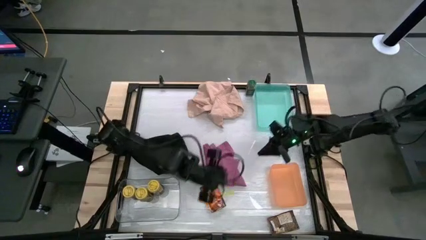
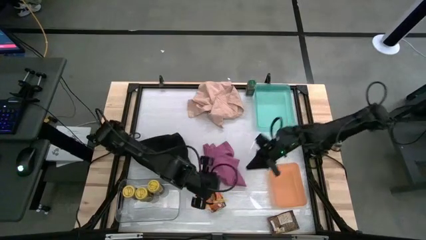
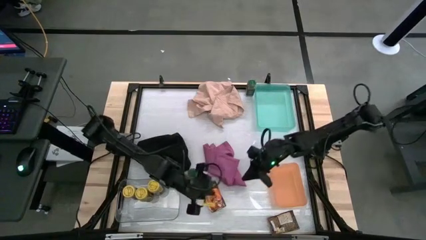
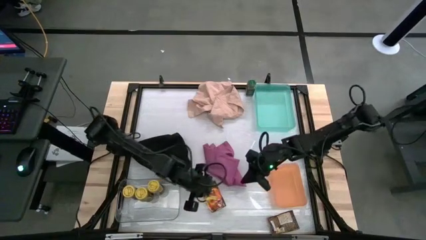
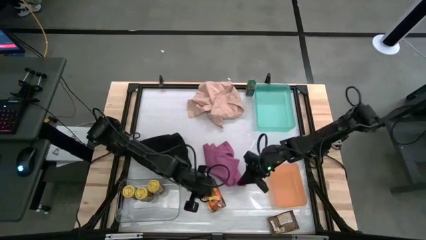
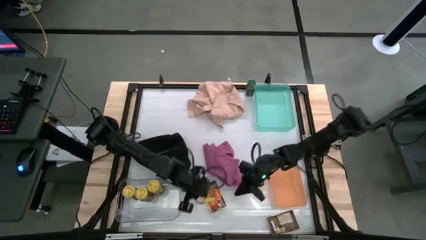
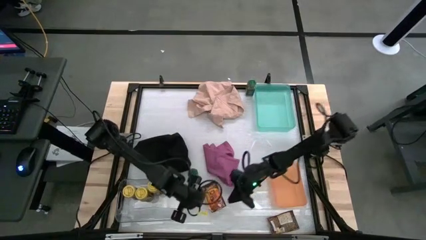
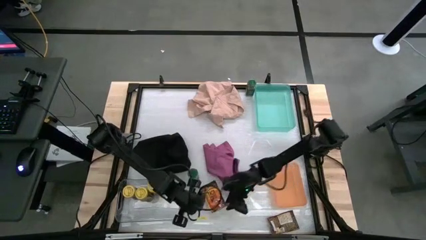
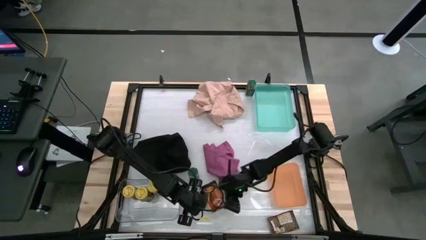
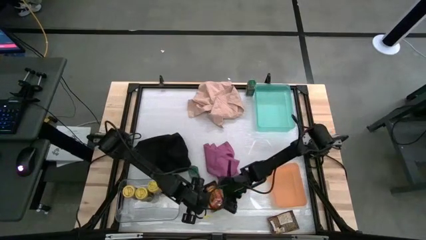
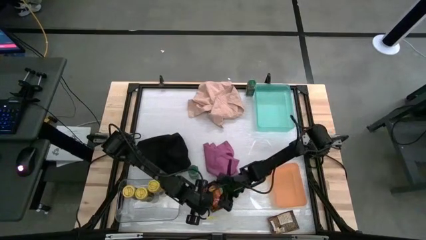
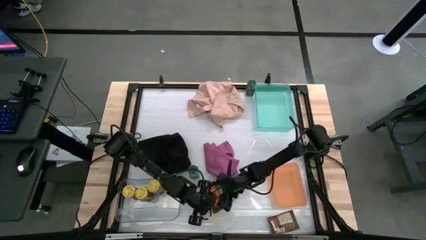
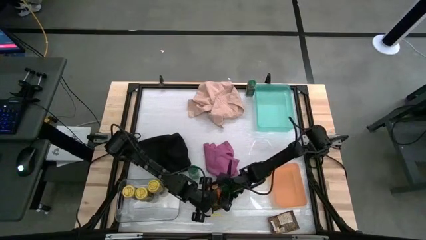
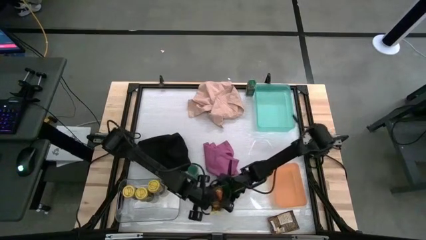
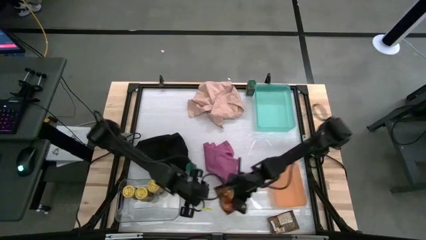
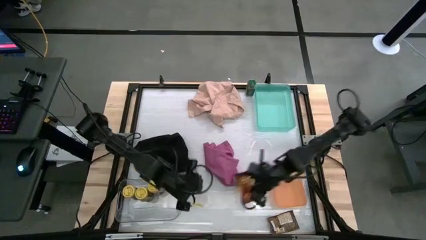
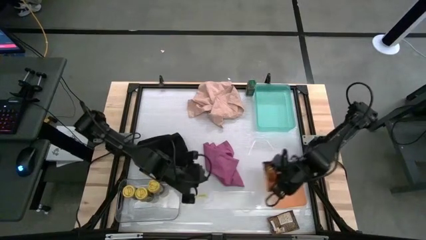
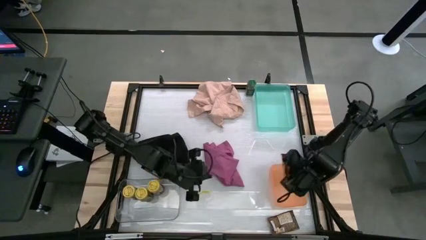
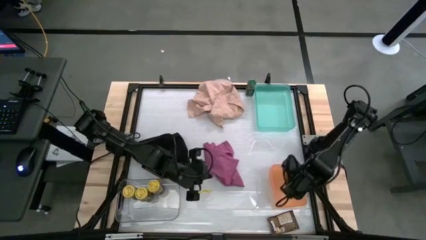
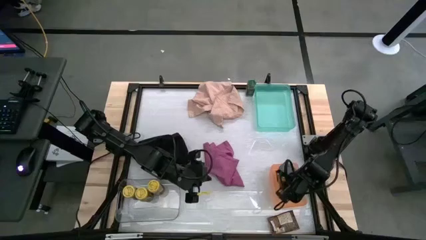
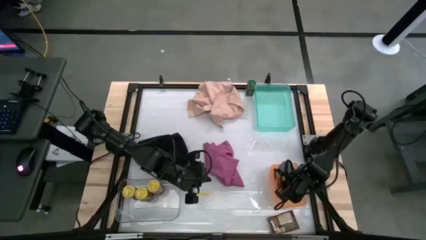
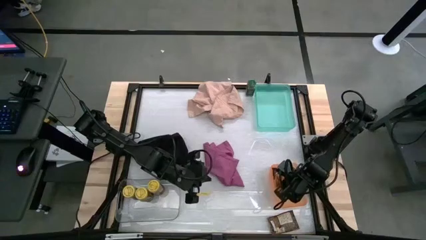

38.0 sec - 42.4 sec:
Task: Sort spices by type
Put the left orange seasoning bag into the orange bin

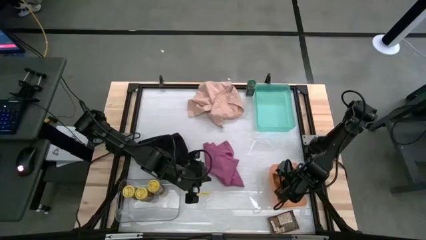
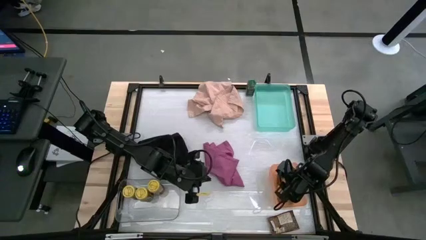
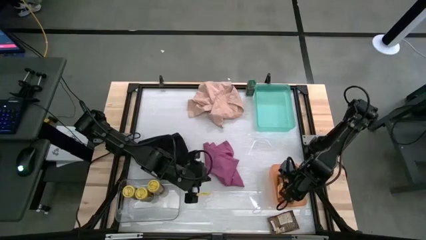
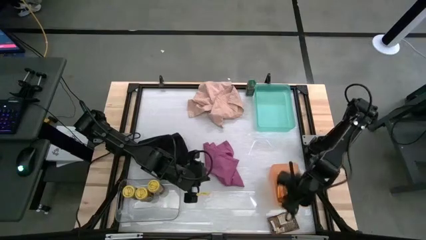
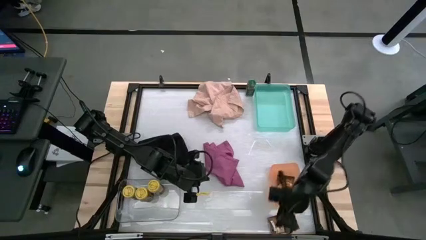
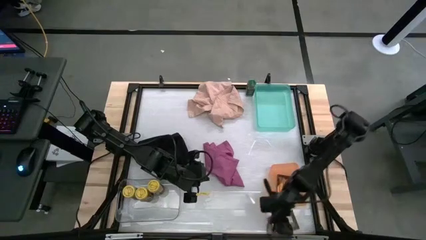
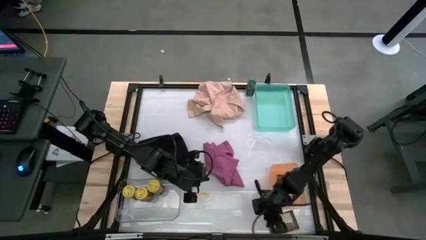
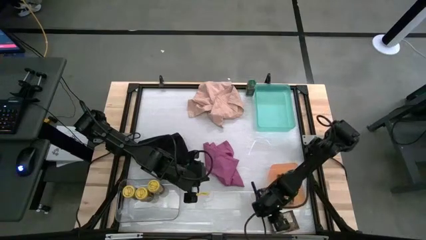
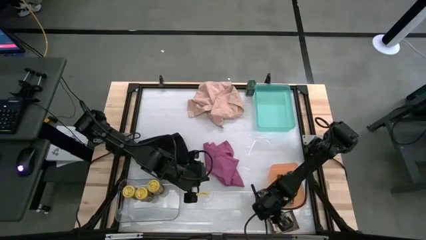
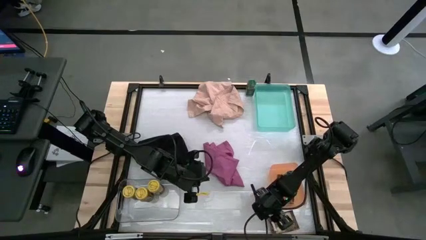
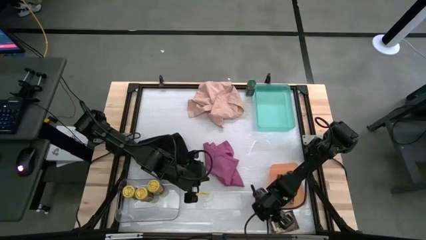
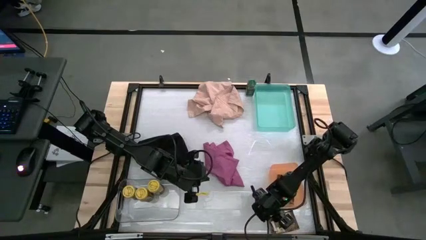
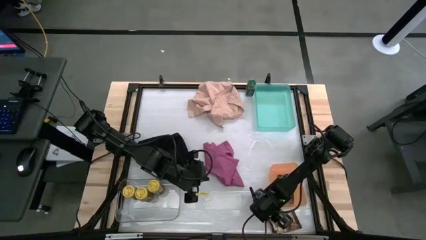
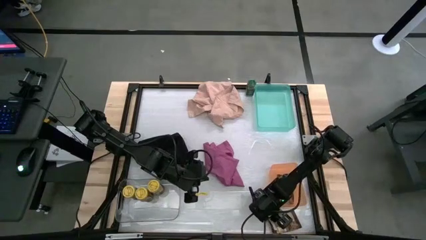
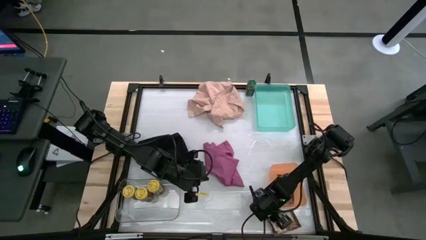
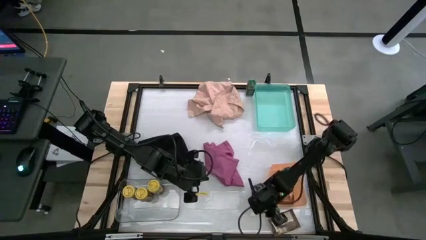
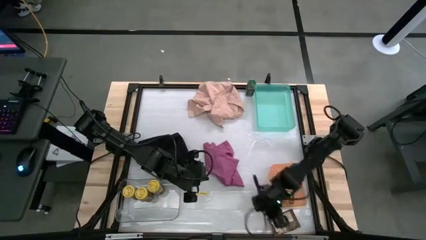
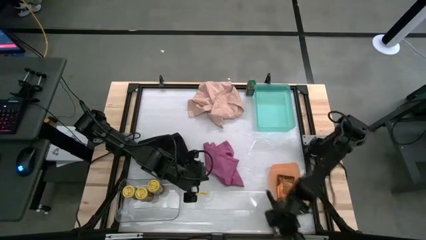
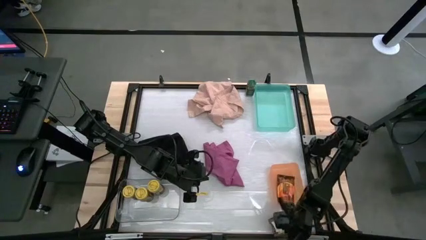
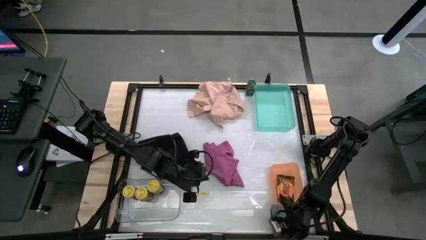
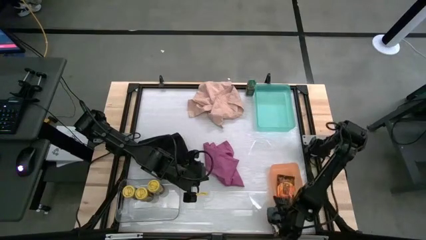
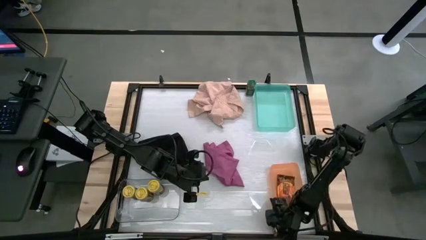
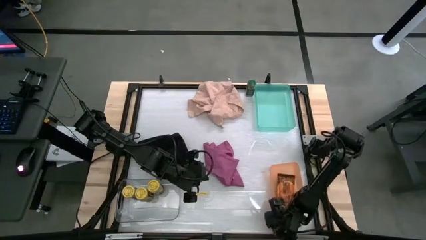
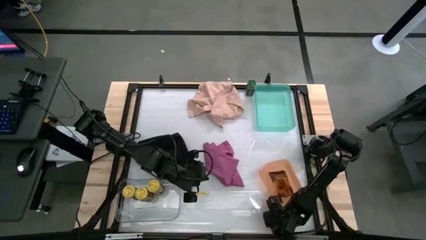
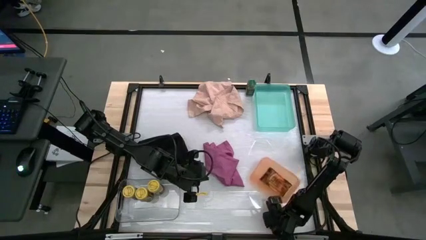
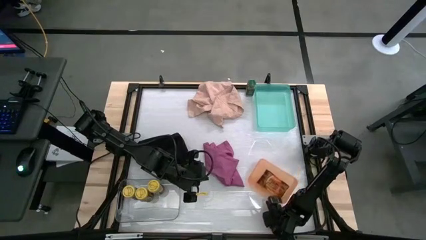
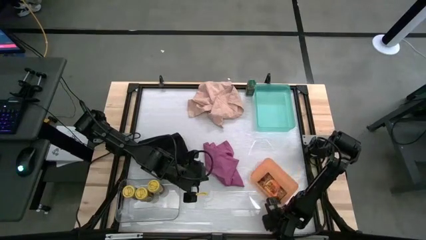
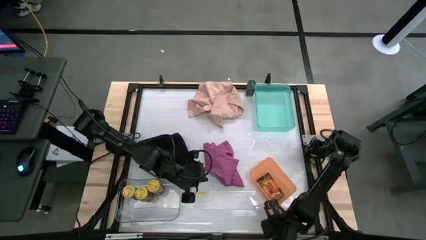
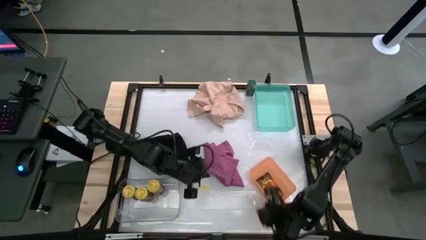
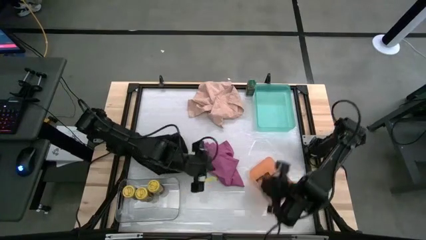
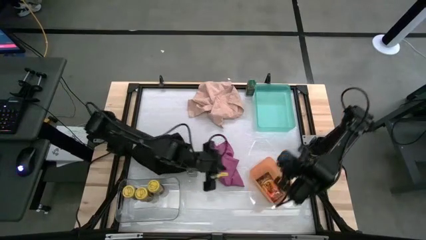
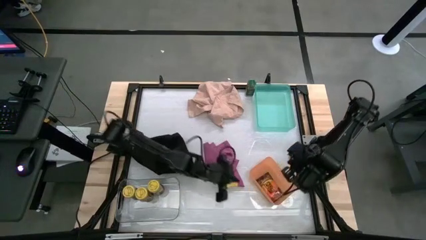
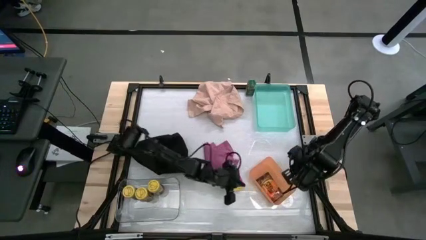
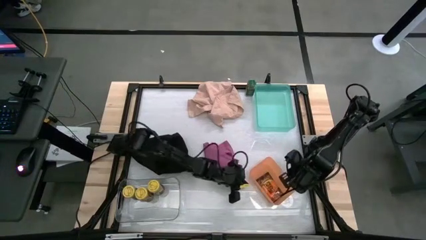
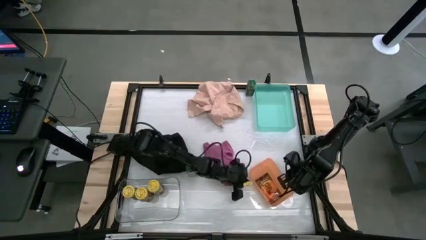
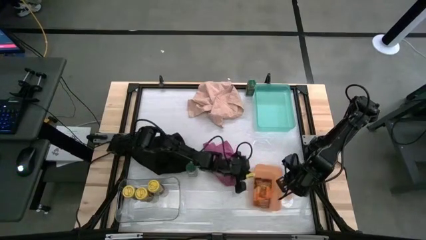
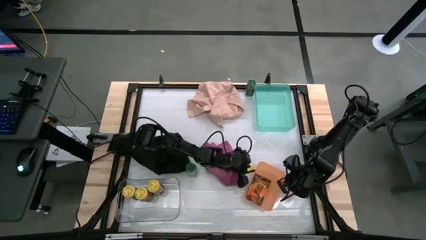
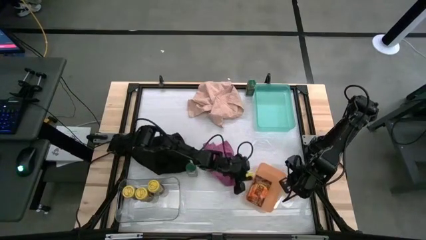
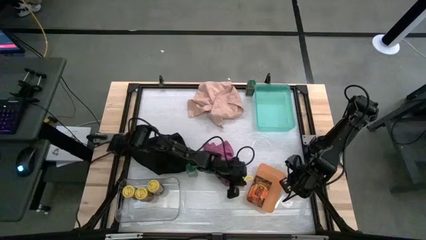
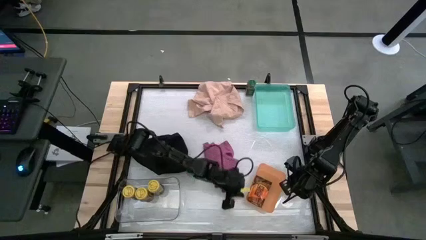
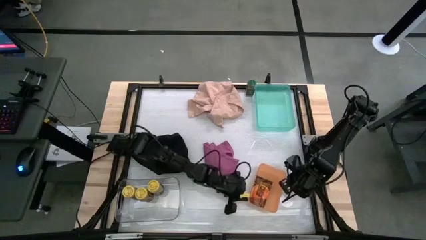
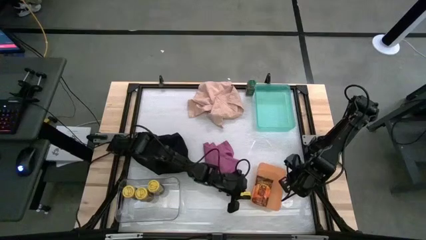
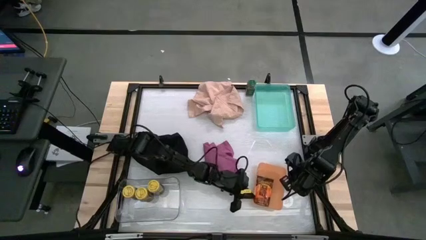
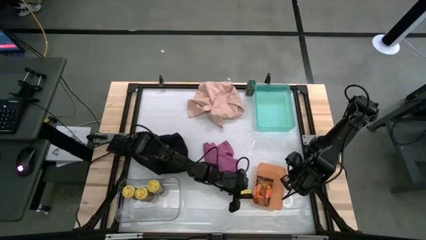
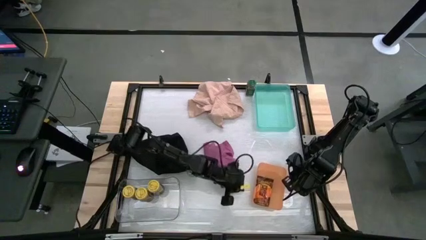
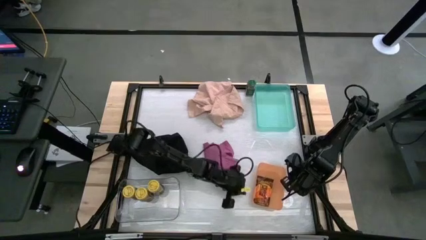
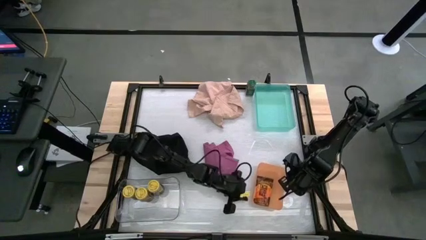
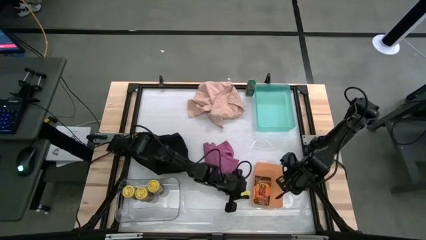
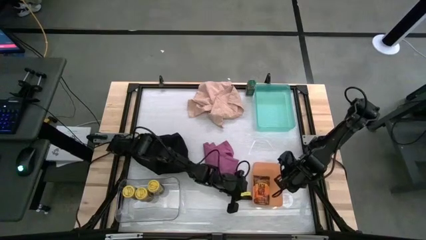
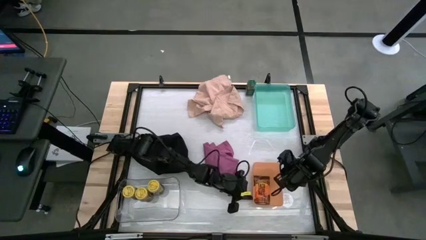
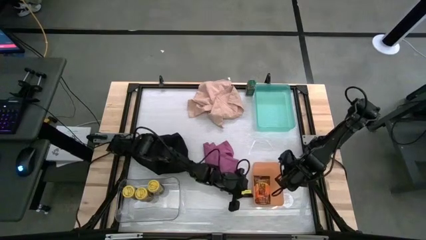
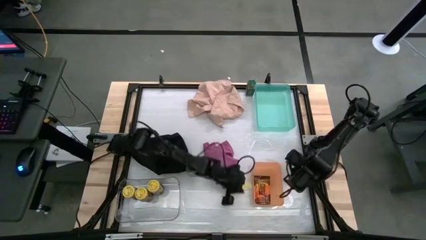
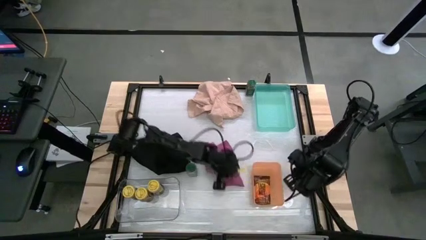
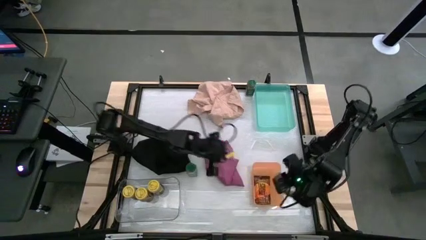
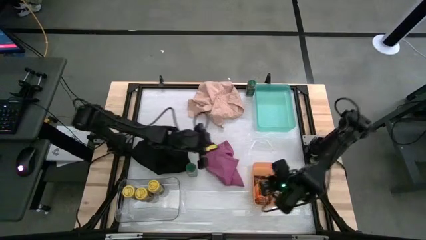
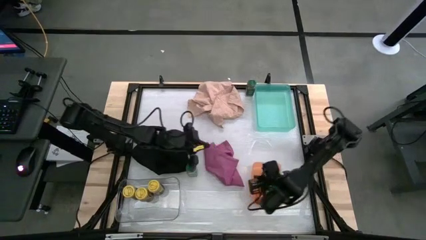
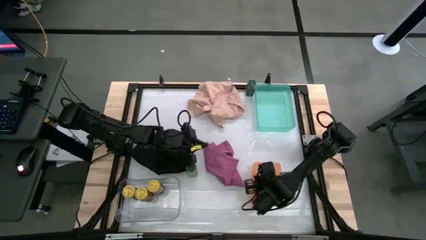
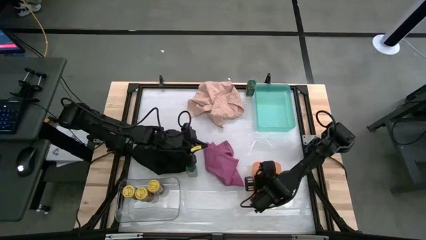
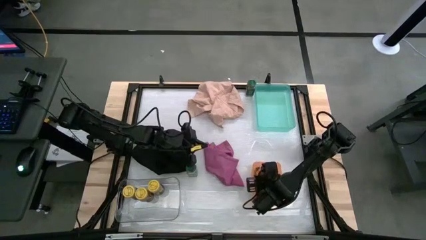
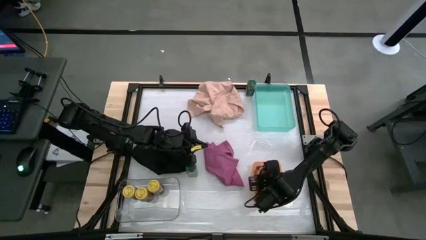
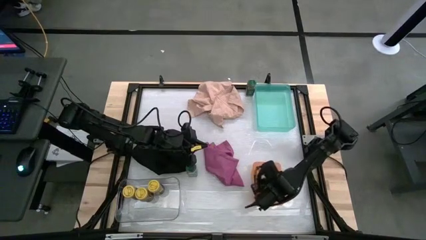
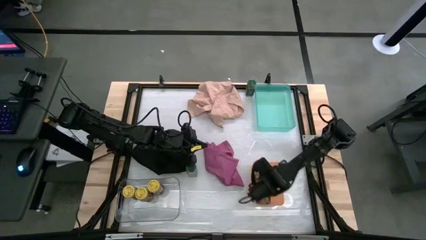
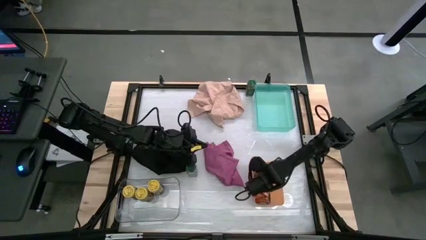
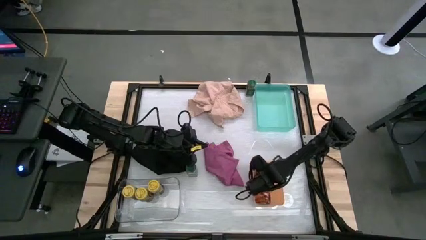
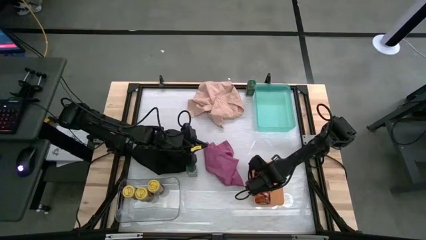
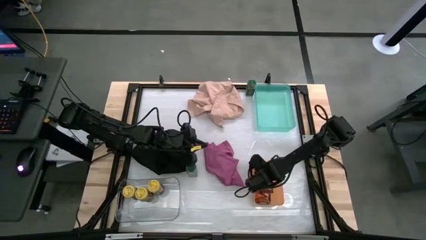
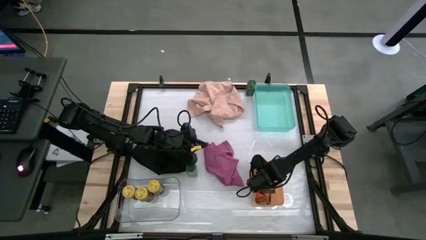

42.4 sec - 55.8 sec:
Put the orange seasoning bag into the orange bin
